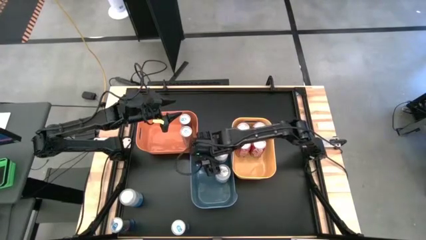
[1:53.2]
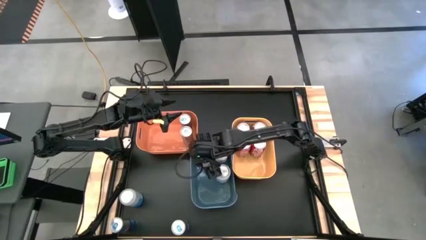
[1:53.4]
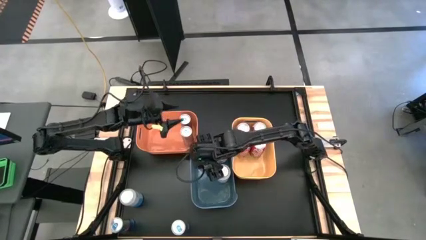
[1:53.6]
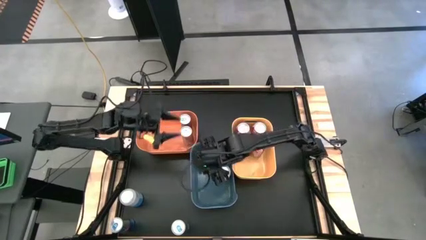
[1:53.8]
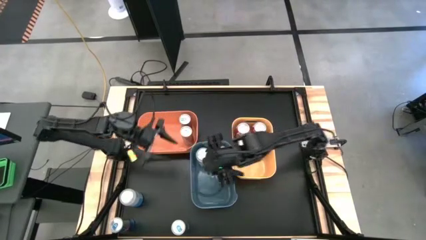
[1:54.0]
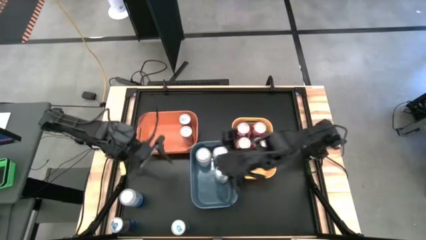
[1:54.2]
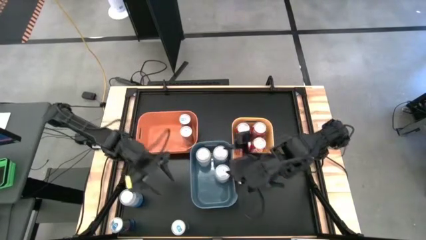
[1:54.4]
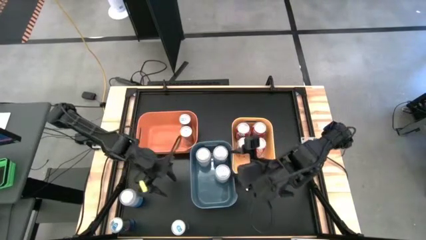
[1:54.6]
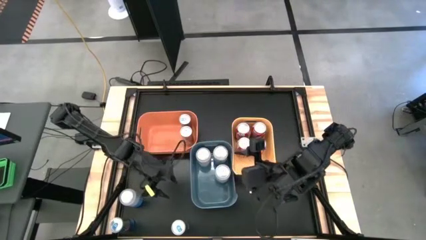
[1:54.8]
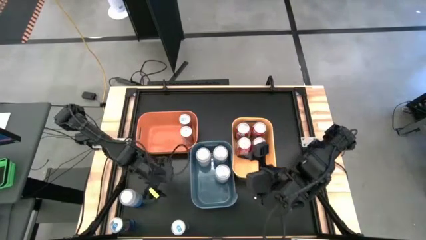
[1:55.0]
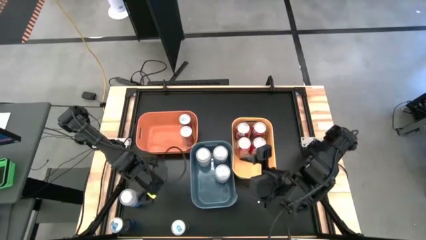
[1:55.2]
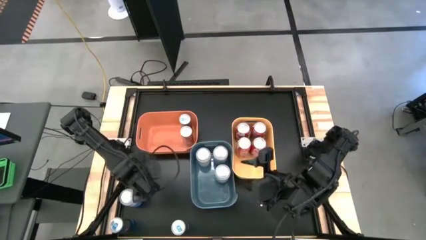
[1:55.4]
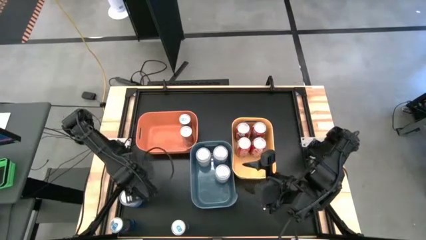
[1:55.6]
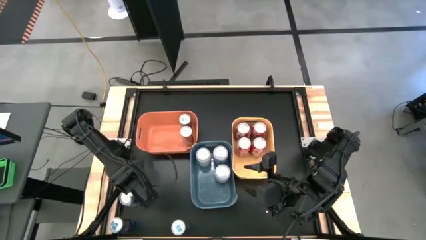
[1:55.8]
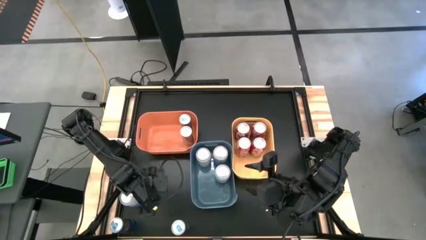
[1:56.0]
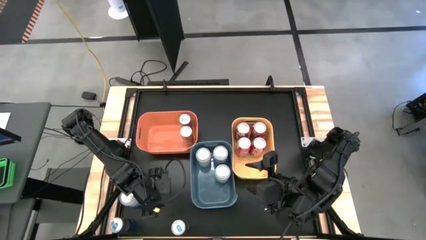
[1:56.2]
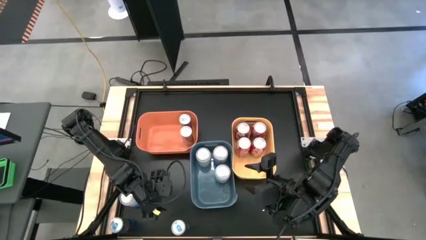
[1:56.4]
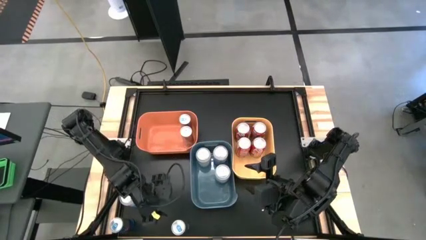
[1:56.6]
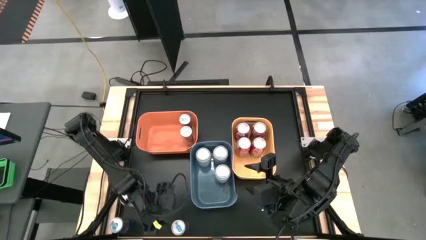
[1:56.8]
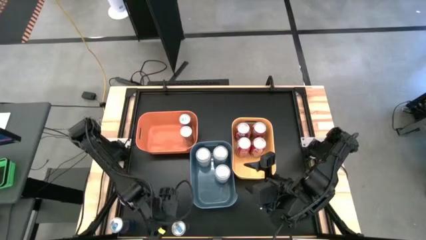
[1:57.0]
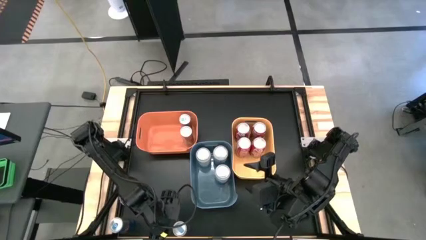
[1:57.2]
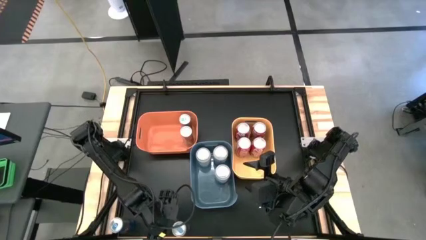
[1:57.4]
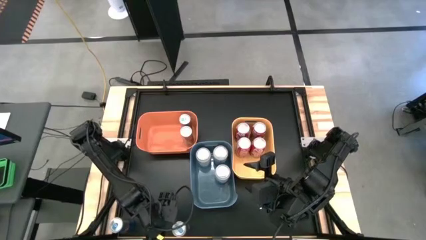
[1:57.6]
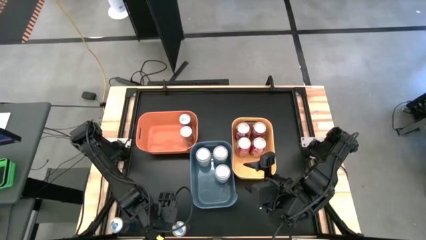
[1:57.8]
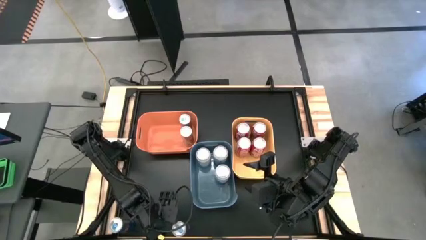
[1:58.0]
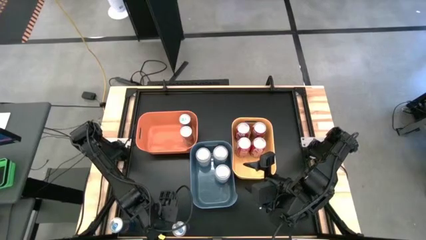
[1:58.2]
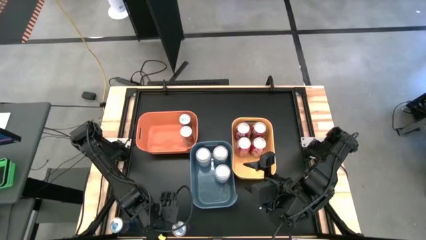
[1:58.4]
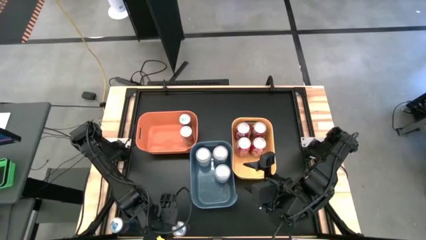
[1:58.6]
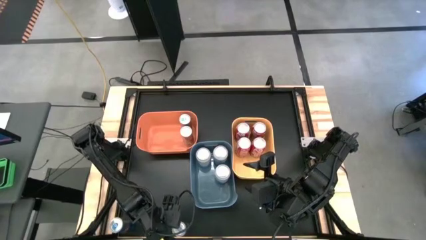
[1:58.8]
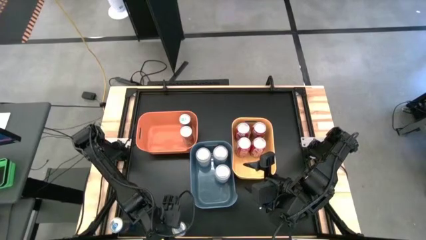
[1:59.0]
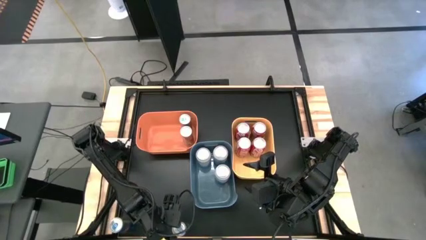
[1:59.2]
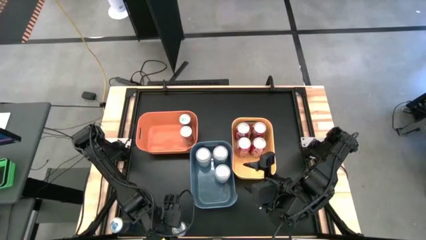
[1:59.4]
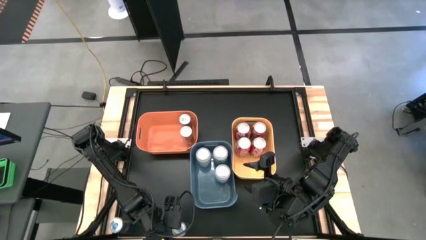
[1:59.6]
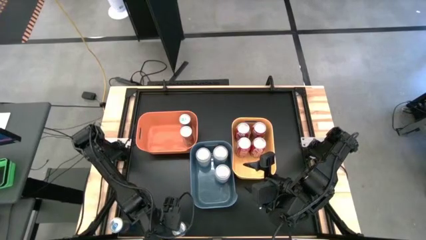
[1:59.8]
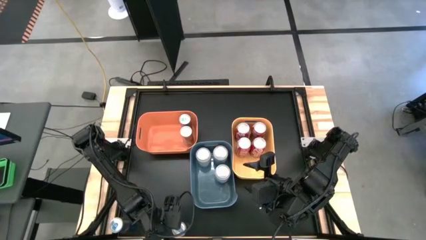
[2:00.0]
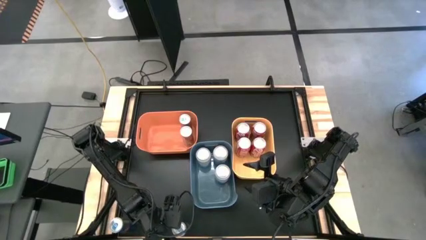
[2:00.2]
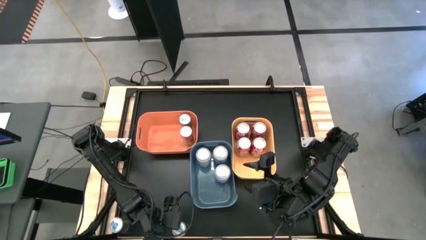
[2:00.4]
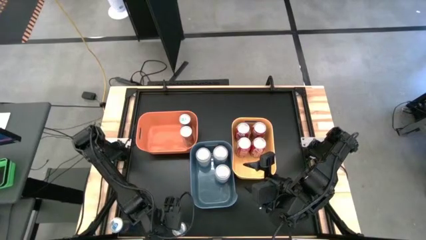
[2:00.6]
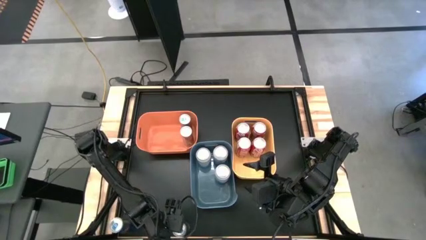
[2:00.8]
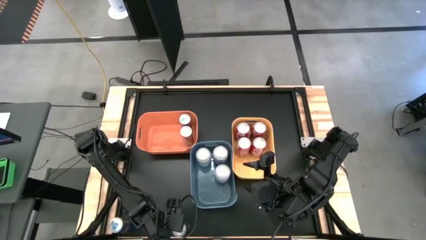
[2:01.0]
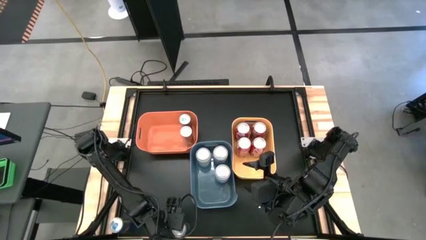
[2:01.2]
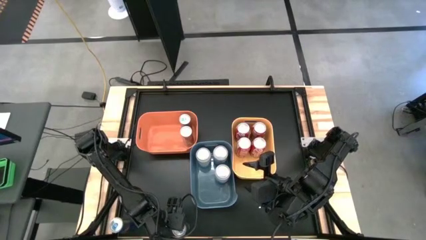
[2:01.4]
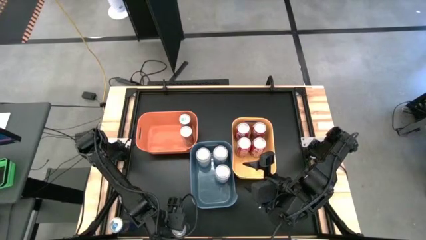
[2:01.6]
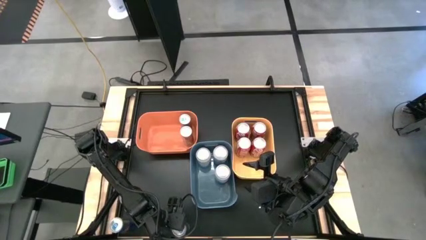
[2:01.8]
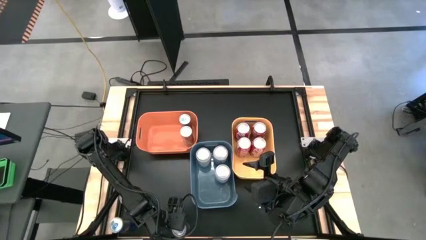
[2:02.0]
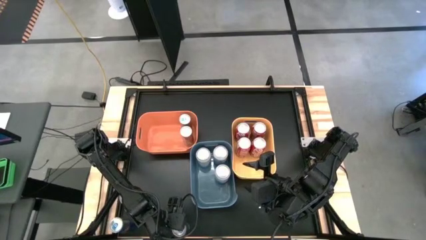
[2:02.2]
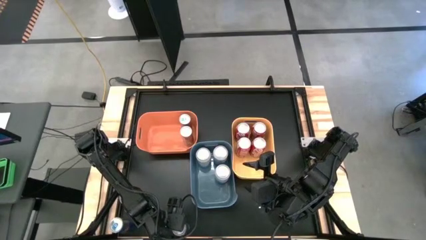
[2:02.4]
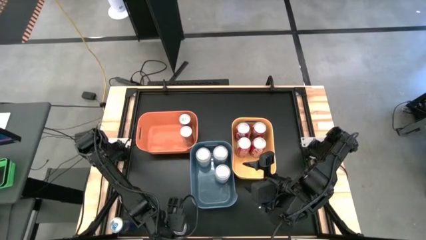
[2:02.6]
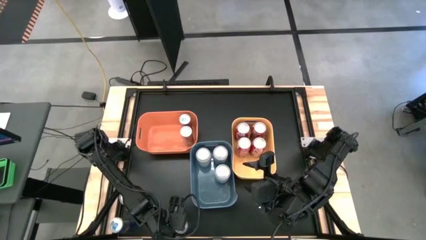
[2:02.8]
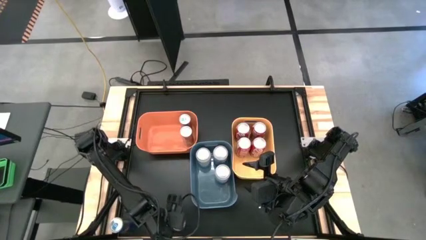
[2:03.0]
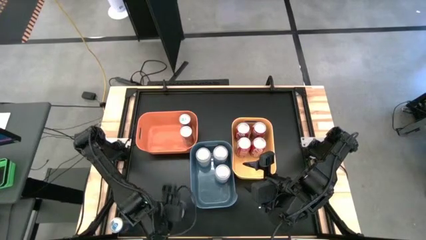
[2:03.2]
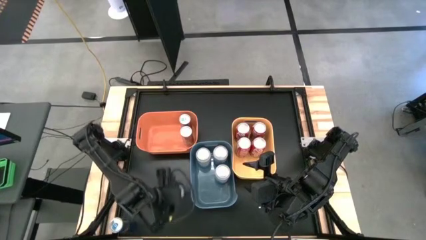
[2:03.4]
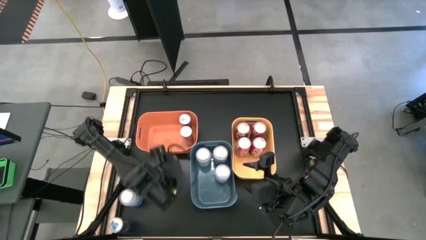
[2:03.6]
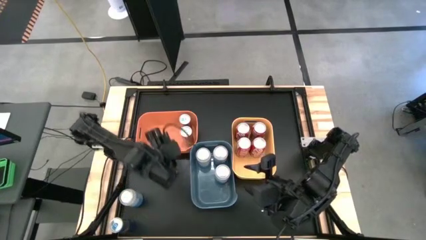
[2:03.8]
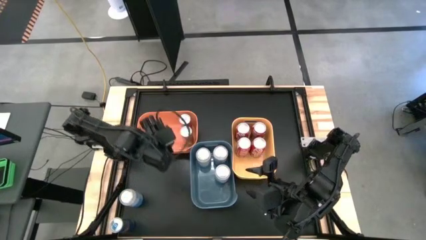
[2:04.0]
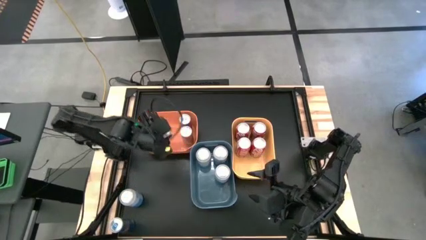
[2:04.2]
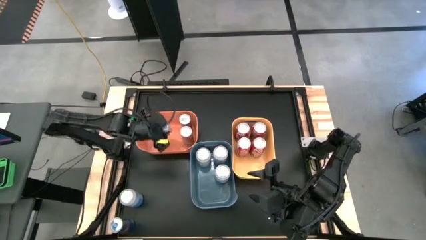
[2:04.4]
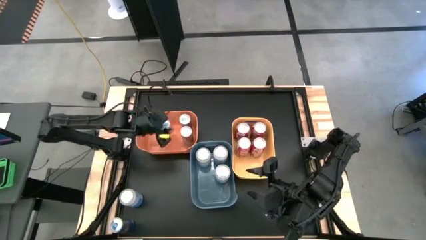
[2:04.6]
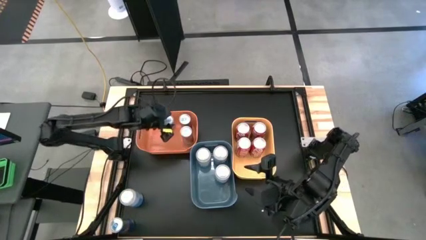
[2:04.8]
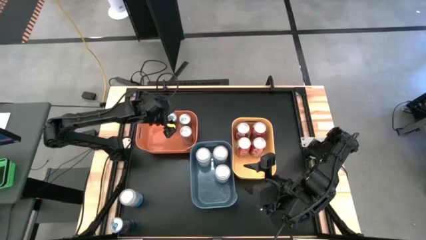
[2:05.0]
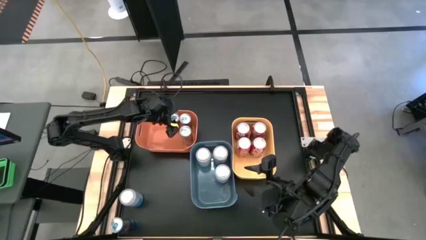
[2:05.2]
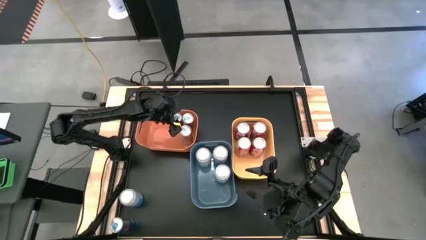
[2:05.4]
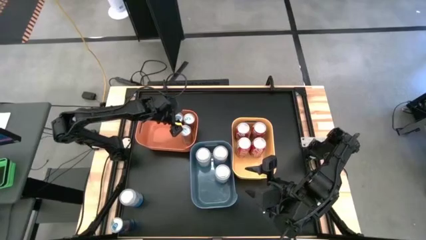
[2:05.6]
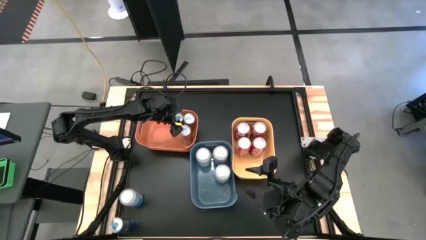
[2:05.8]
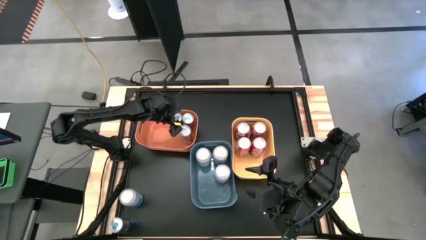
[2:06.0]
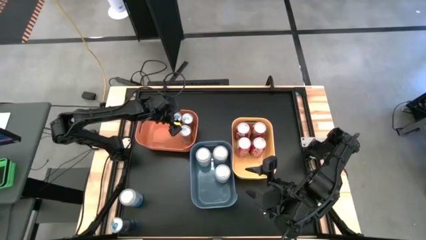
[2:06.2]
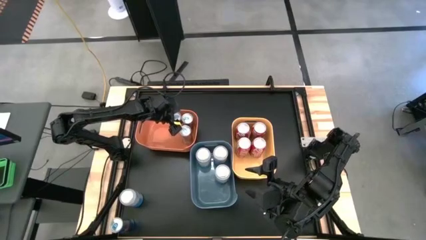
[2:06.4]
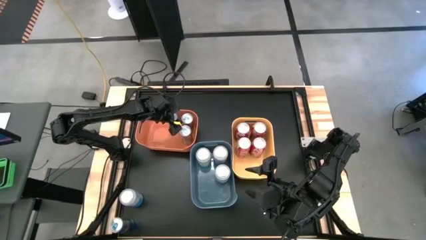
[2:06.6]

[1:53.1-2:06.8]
Task: Sort soda cans
Put the right blue soda can into the orange bin

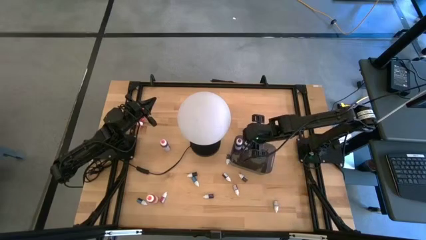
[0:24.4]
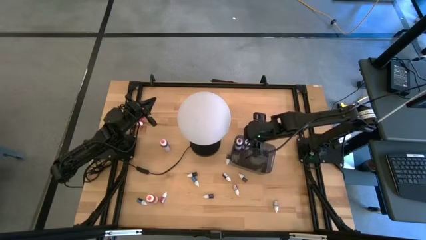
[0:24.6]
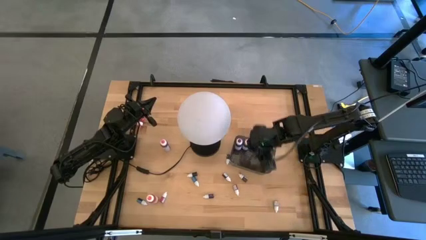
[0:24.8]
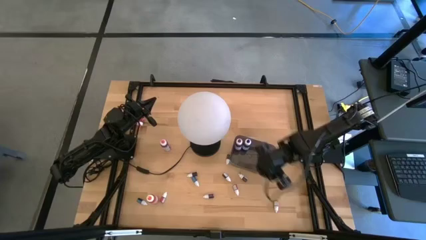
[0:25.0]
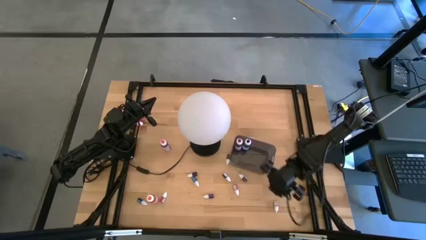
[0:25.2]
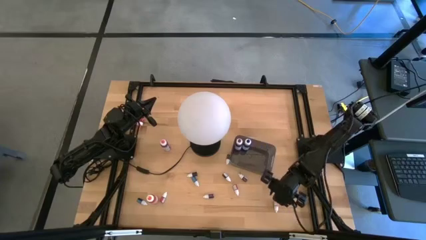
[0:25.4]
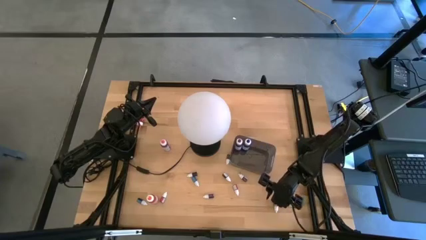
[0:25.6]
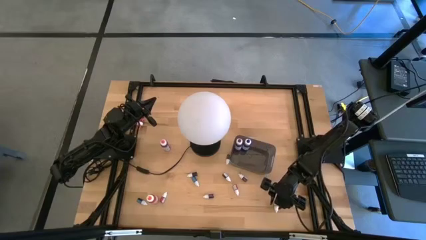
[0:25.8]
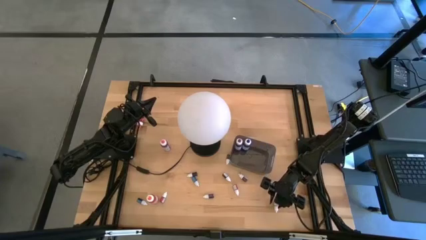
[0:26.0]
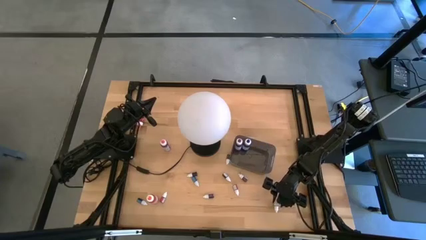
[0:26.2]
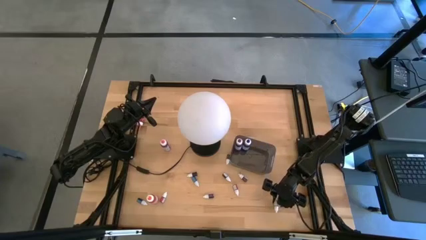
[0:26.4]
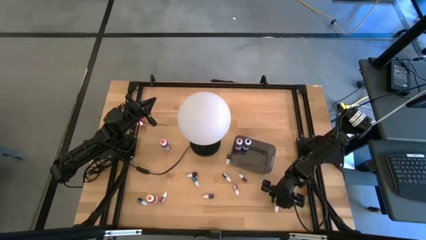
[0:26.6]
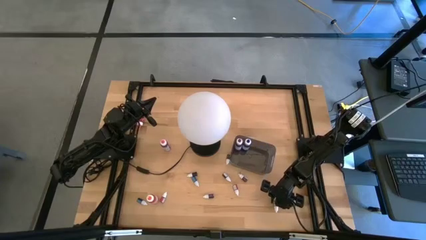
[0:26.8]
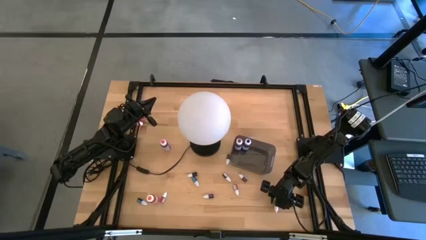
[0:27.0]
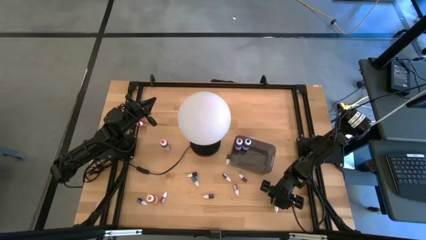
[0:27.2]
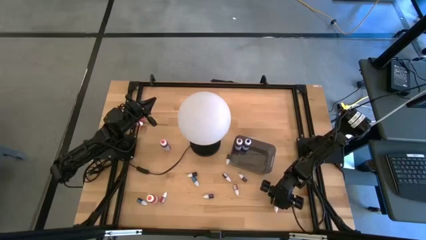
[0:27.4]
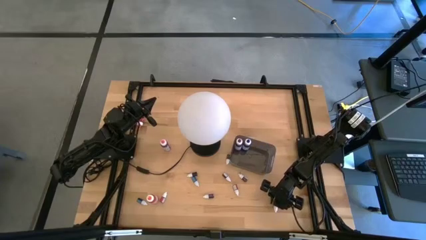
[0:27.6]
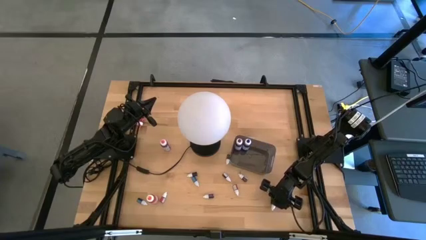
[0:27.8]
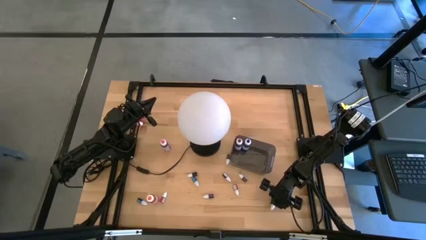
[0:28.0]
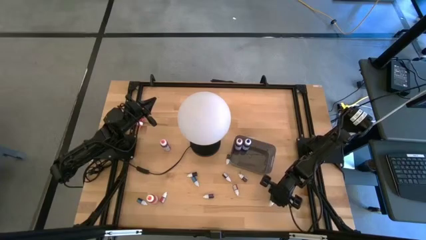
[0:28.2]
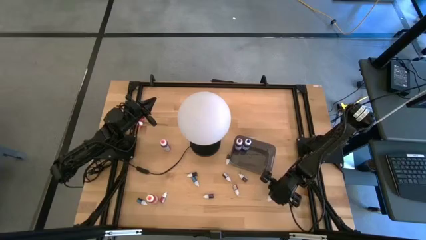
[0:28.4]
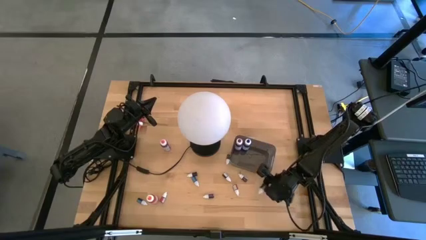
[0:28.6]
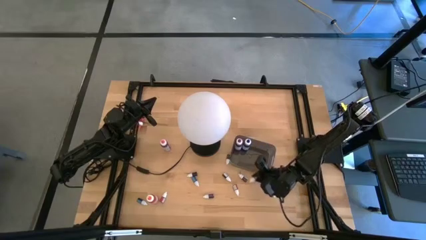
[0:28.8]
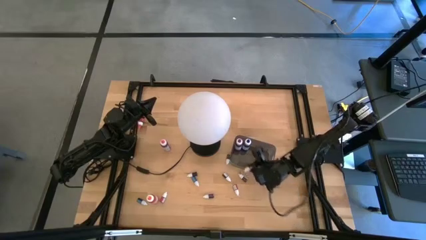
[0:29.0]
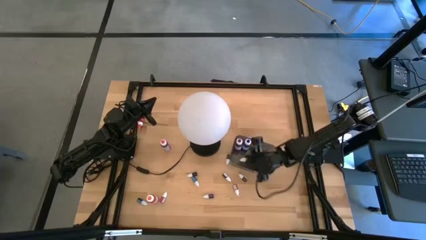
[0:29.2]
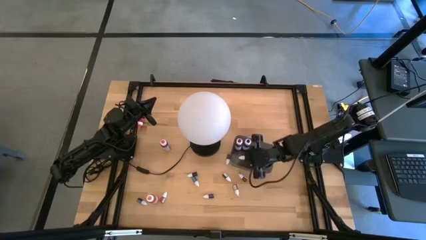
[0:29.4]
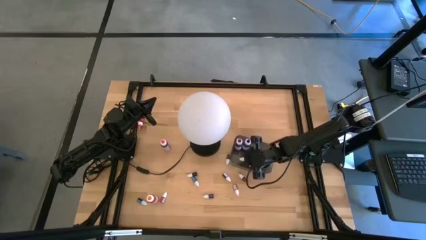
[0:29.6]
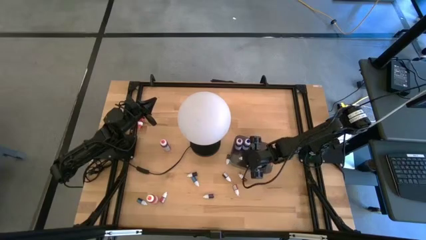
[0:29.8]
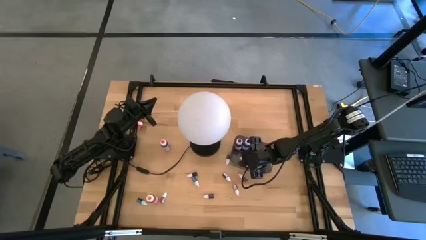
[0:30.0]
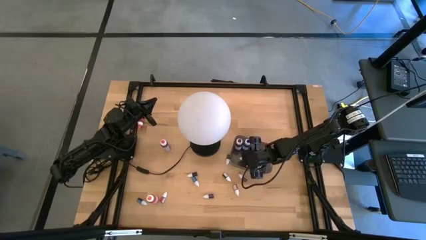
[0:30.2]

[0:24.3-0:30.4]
Task: Pick & Place food coloring
Put the small right red food coloring bottle into the black container
